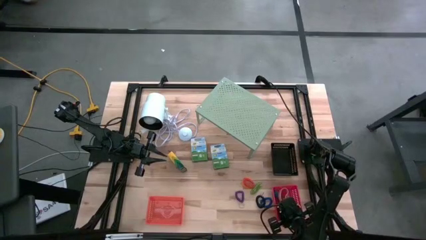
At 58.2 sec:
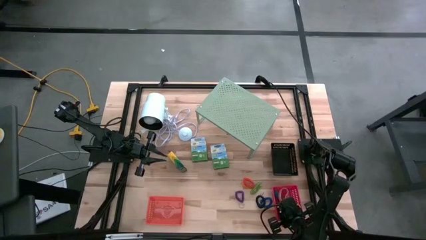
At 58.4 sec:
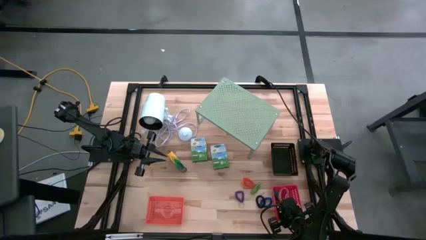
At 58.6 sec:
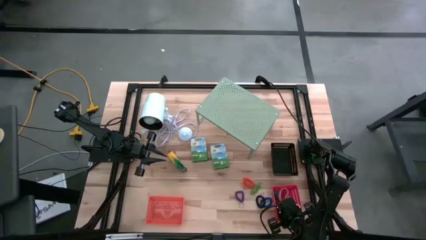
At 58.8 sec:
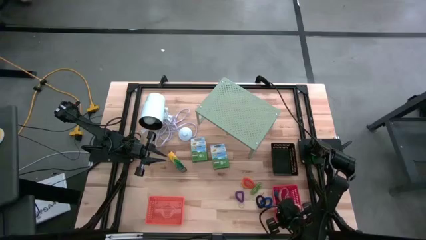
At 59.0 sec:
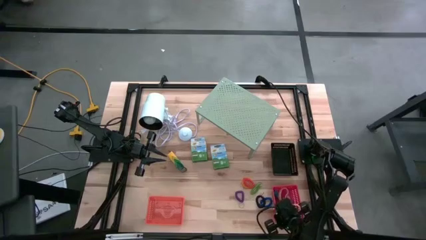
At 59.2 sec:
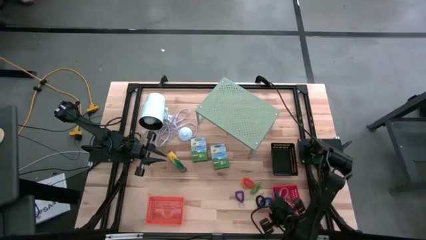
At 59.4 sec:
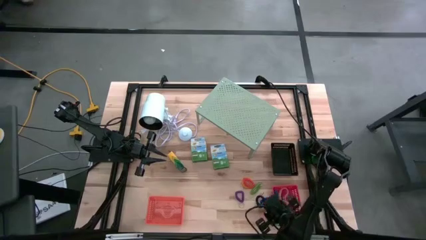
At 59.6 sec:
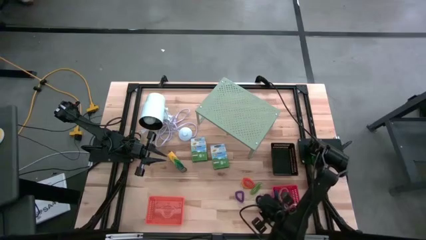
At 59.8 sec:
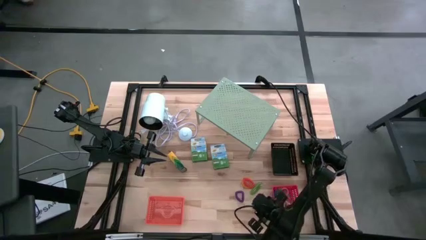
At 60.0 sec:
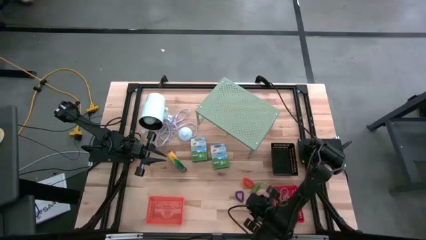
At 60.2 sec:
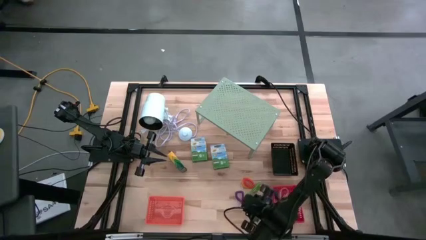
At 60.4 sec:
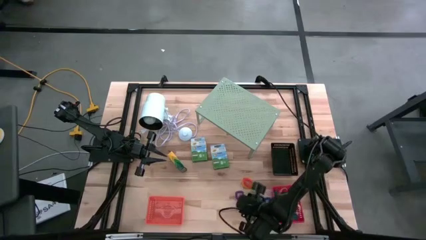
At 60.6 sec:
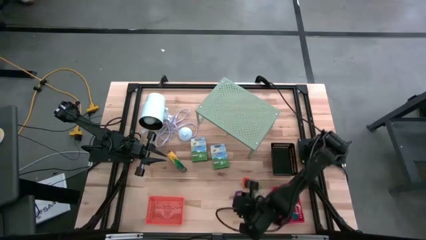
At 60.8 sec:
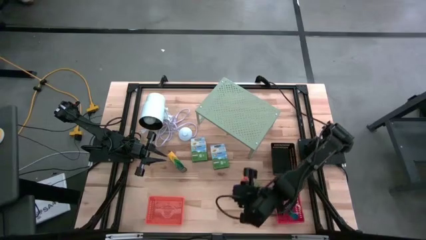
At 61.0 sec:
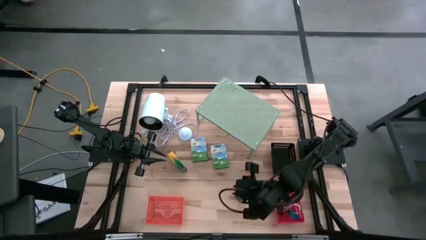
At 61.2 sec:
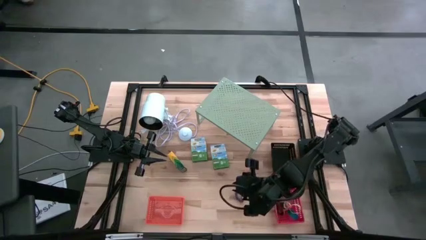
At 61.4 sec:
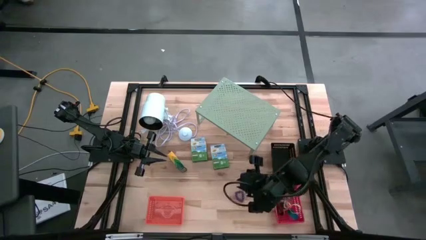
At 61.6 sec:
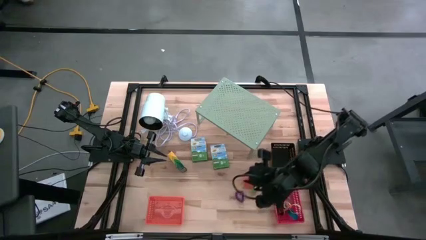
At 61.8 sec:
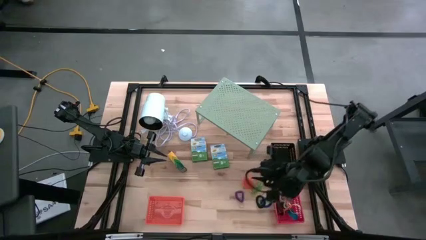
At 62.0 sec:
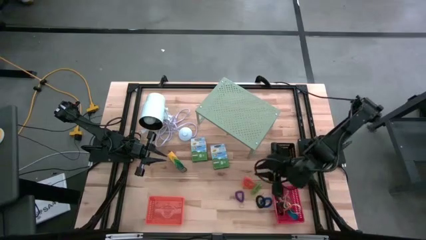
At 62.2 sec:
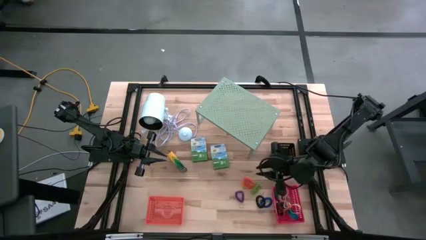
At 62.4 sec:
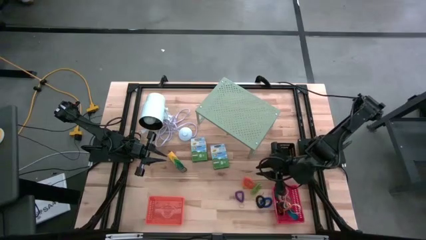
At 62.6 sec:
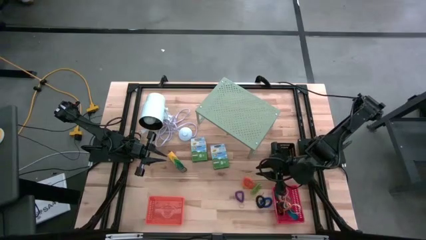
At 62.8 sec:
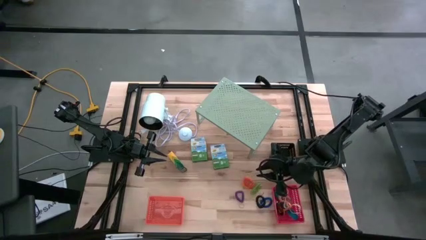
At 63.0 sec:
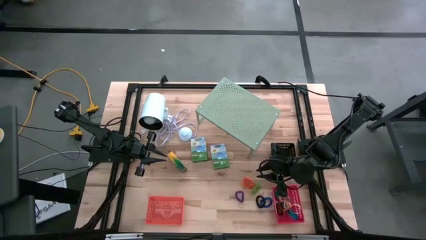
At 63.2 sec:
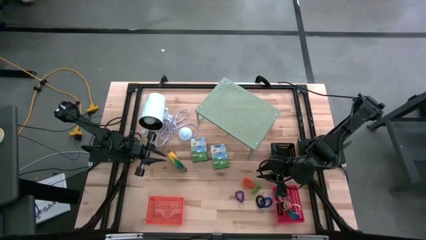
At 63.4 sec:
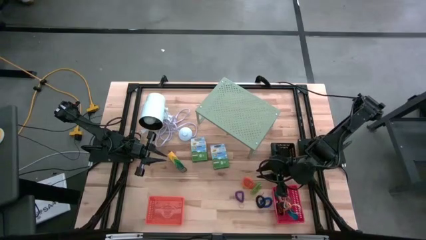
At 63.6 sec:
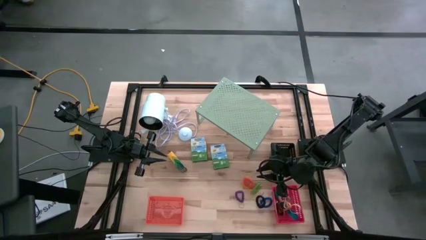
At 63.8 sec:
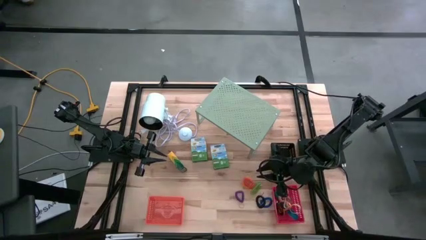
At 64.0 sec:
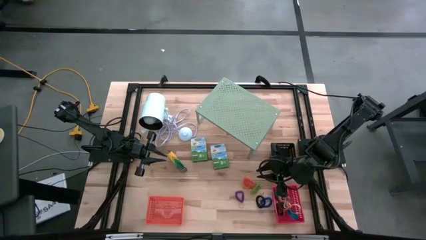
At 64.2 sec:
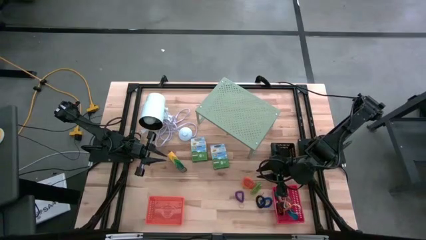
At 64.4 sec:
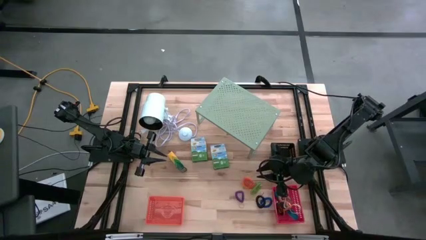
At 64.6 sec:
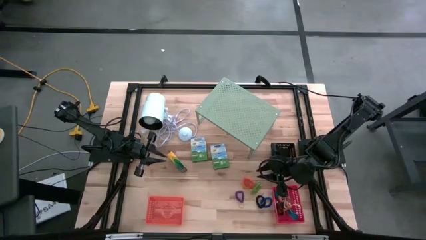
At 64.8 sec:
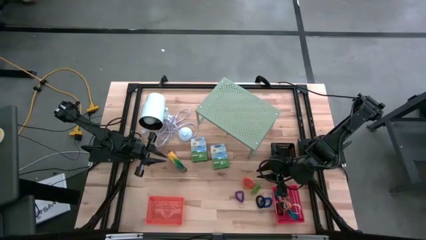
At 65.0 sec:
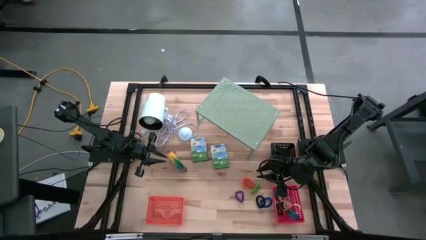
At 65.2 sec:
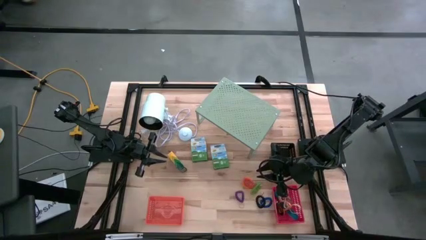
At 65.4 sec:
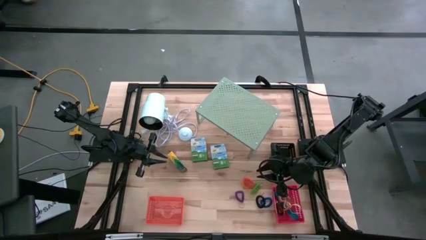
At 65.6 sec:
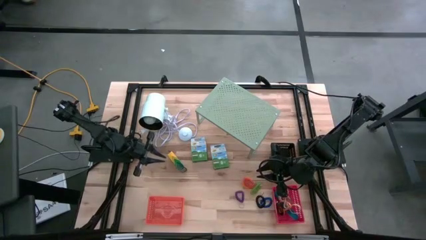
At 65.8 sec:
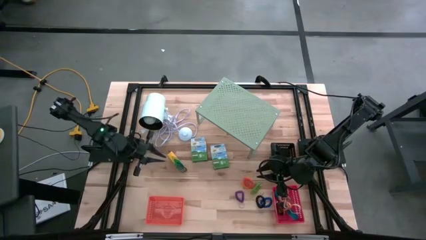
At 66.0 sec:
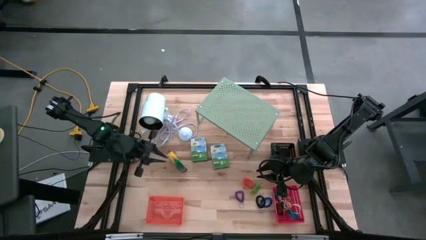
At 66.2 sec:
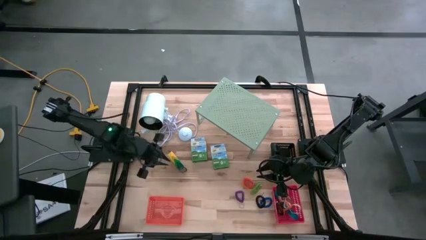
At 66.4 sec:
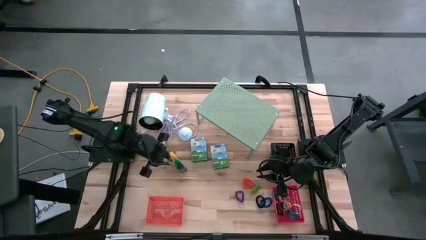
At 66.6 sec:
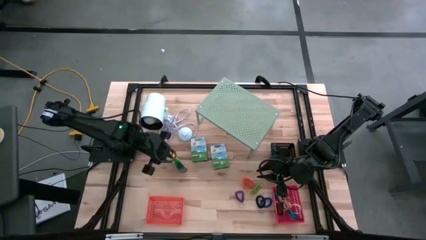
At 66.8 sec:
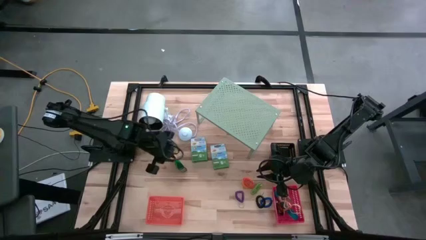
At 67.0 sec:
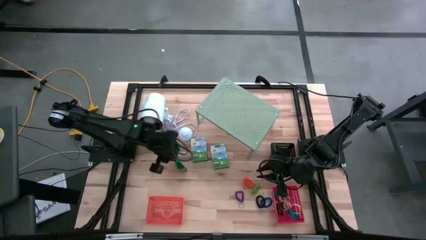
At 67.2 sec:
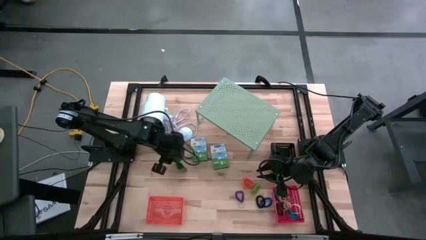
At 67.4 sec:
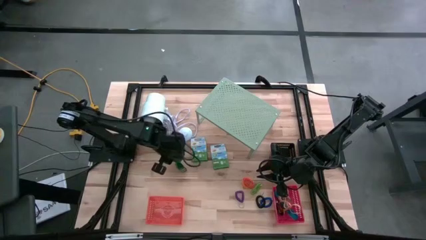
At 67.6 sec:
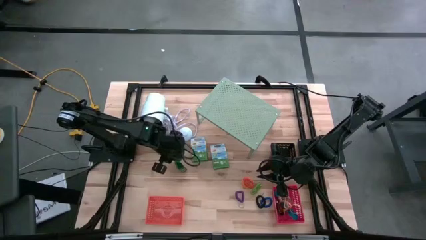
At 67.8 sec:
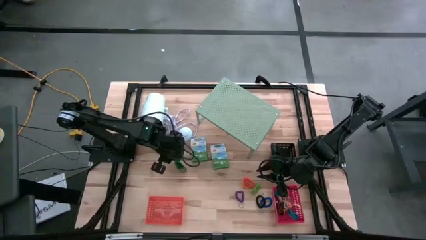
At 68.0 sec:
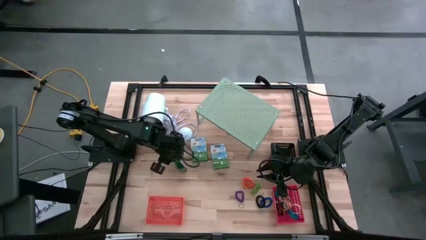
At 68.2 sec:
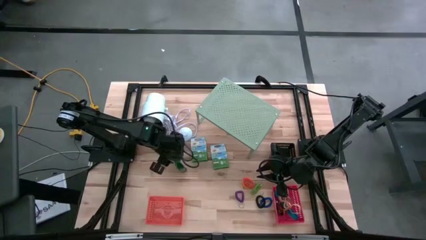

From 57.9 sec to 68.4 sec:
Task: Pick & Place Office Desk Supplies
Put the left crayon box into the orange bin
